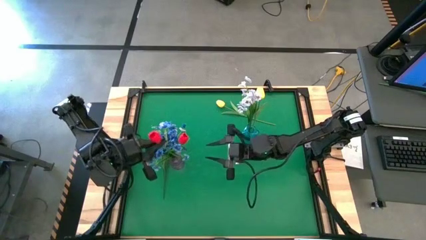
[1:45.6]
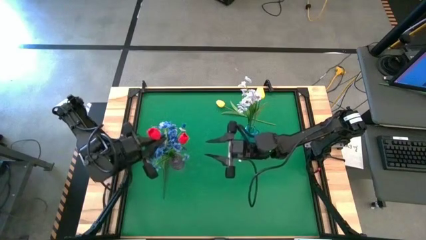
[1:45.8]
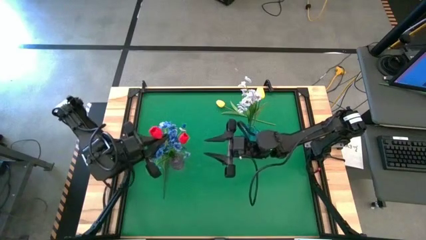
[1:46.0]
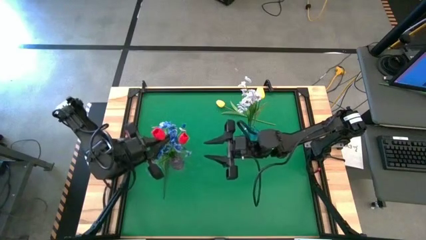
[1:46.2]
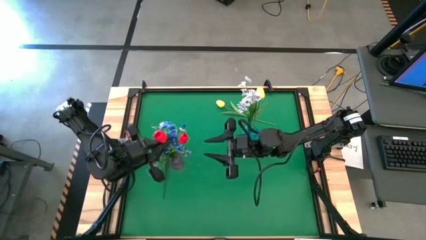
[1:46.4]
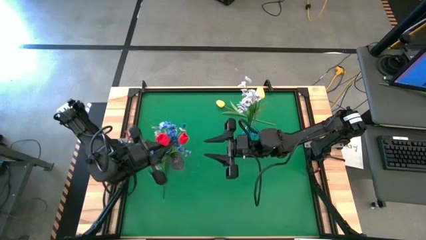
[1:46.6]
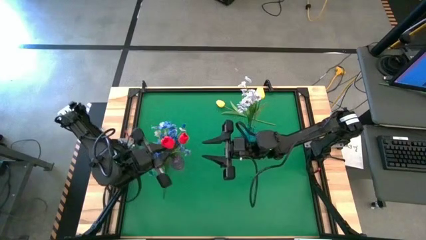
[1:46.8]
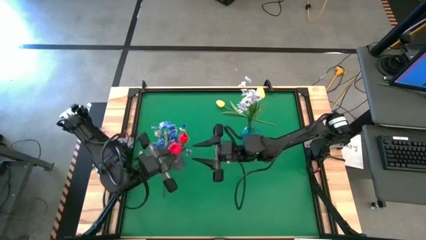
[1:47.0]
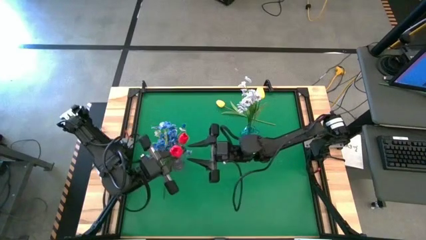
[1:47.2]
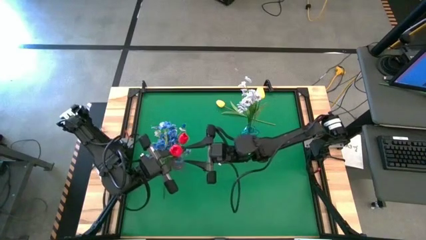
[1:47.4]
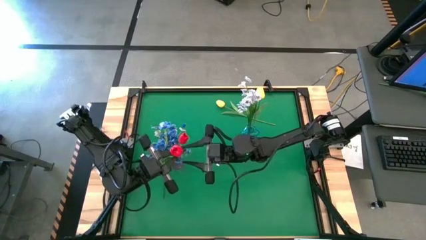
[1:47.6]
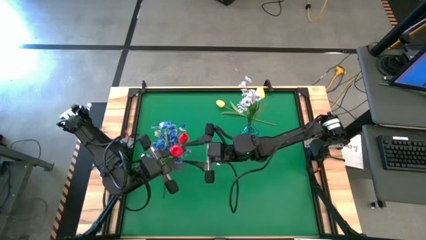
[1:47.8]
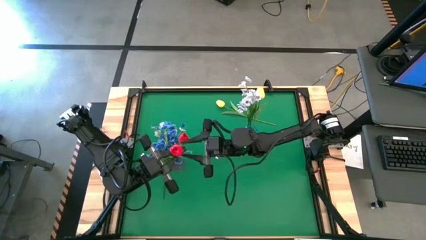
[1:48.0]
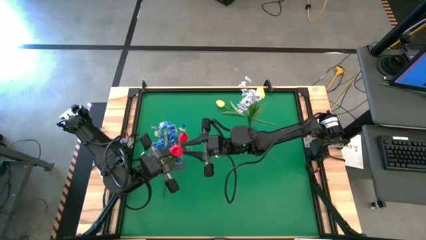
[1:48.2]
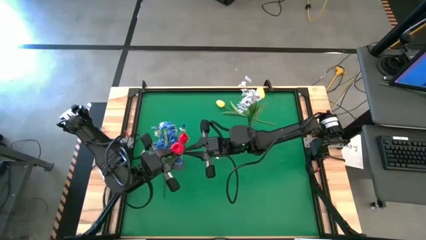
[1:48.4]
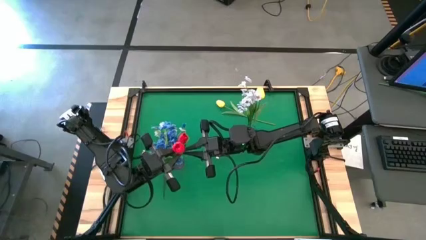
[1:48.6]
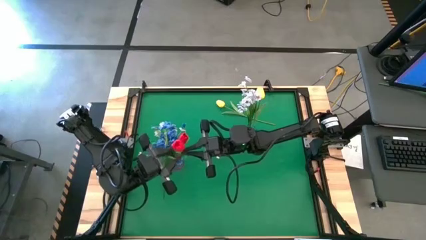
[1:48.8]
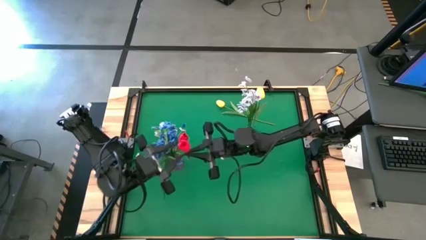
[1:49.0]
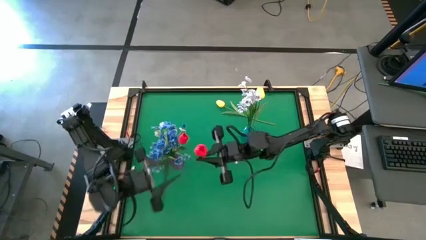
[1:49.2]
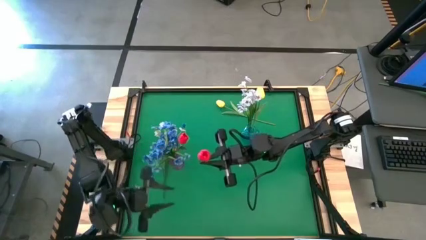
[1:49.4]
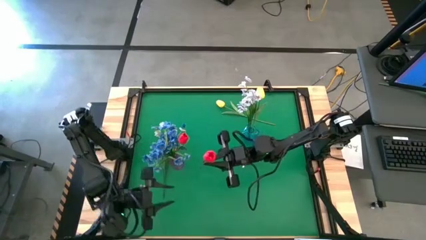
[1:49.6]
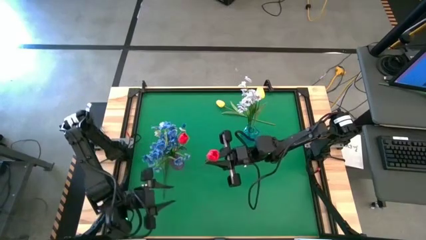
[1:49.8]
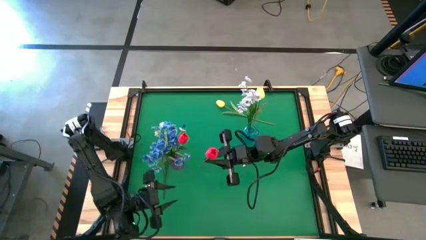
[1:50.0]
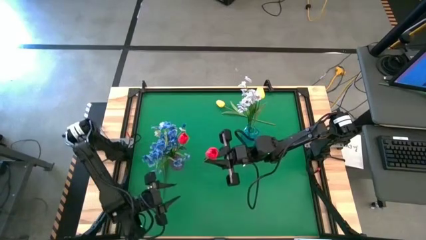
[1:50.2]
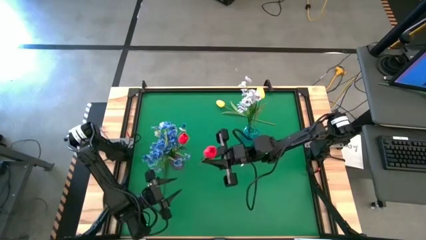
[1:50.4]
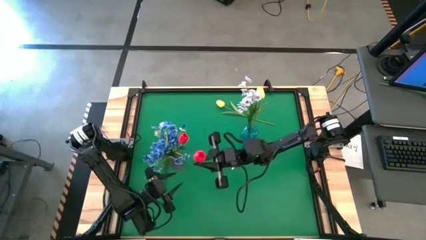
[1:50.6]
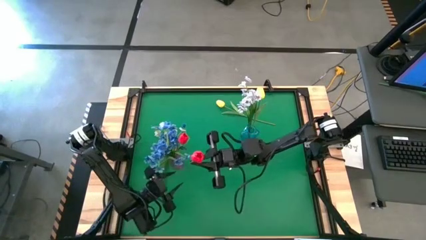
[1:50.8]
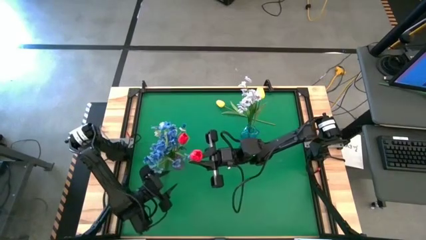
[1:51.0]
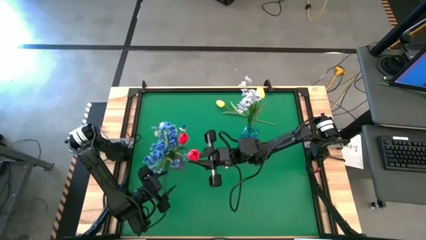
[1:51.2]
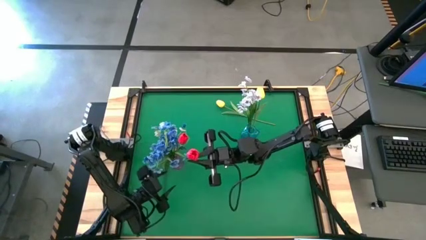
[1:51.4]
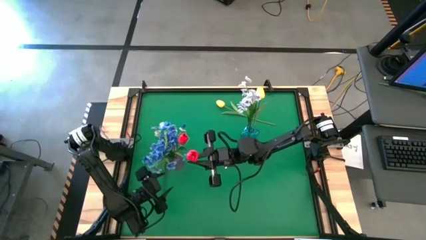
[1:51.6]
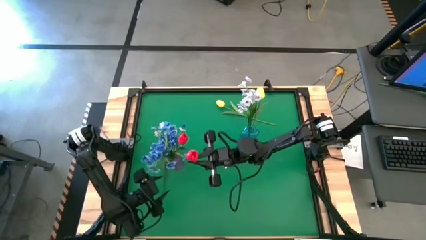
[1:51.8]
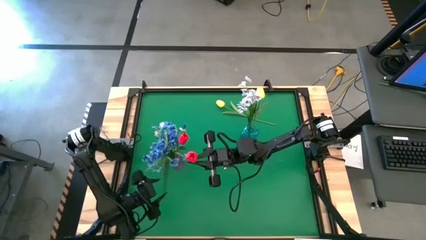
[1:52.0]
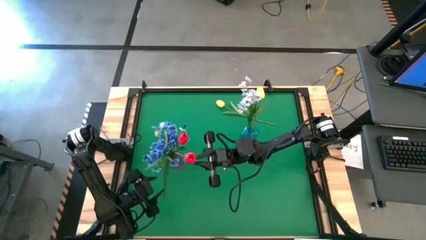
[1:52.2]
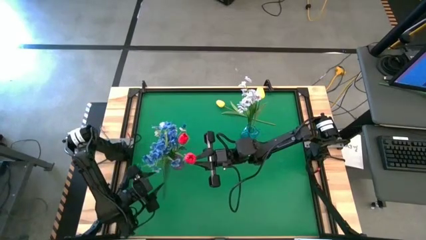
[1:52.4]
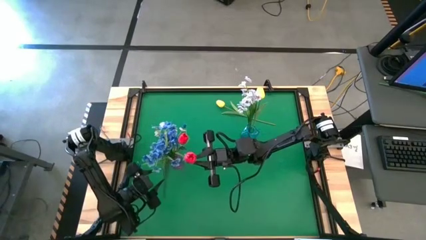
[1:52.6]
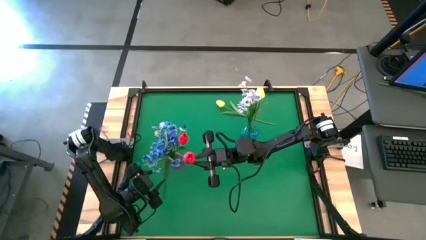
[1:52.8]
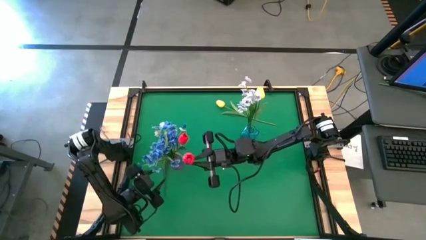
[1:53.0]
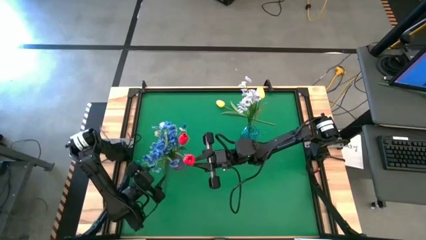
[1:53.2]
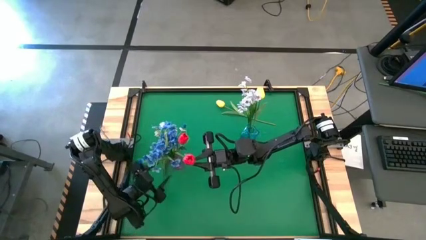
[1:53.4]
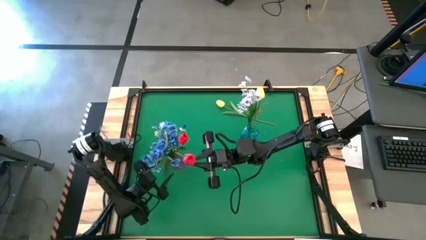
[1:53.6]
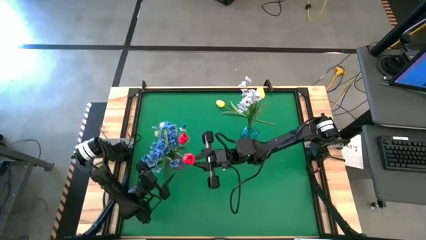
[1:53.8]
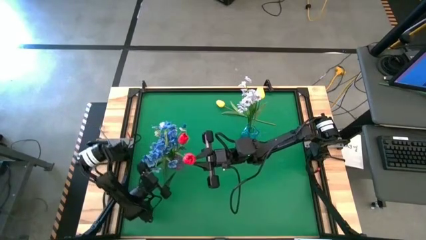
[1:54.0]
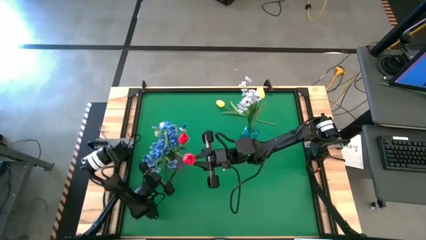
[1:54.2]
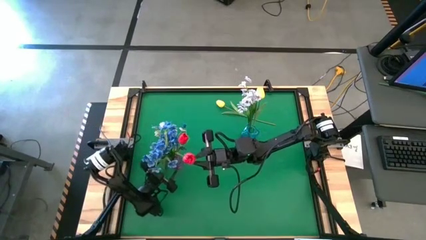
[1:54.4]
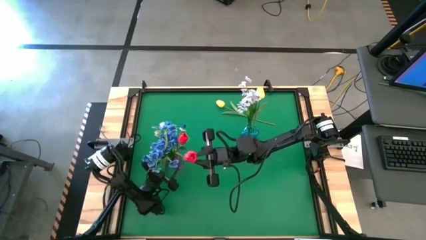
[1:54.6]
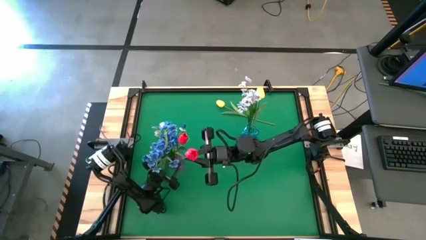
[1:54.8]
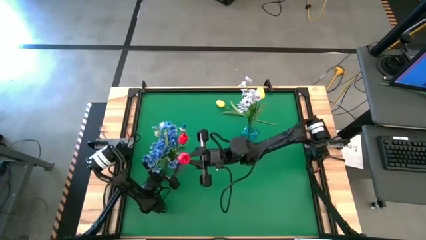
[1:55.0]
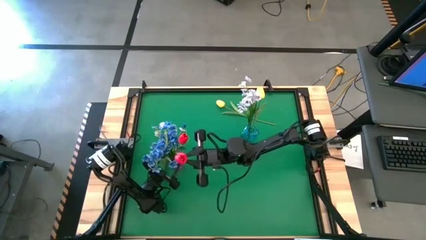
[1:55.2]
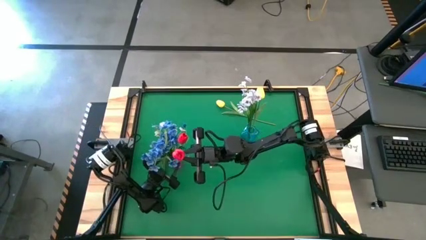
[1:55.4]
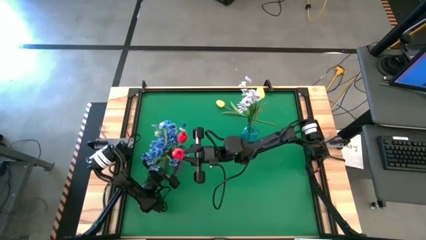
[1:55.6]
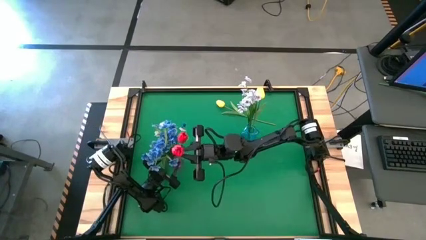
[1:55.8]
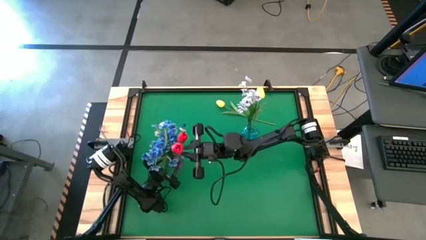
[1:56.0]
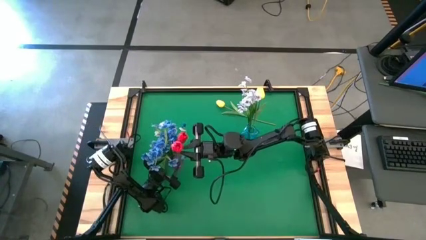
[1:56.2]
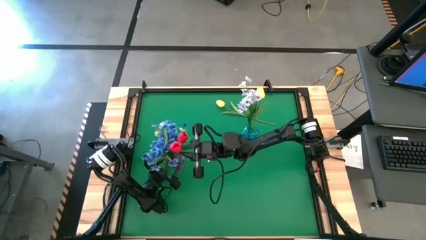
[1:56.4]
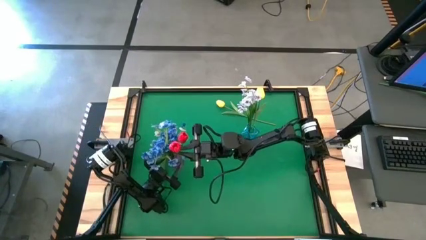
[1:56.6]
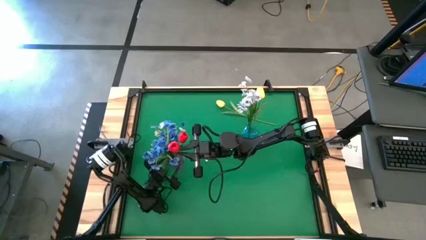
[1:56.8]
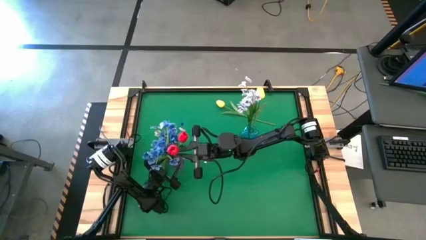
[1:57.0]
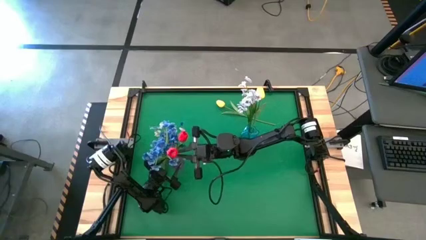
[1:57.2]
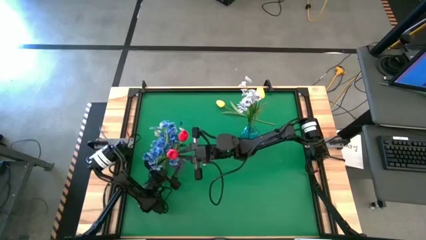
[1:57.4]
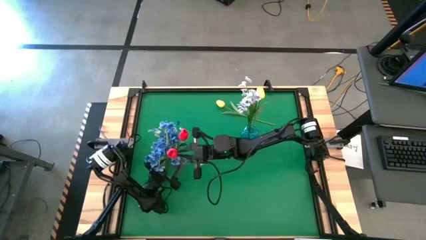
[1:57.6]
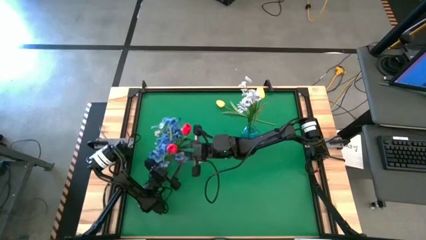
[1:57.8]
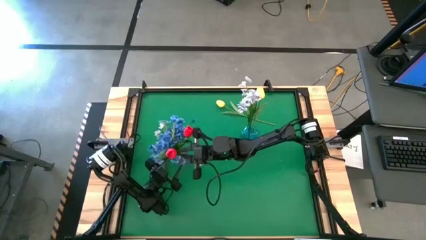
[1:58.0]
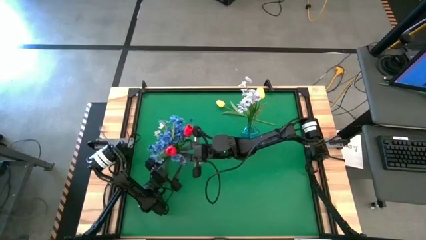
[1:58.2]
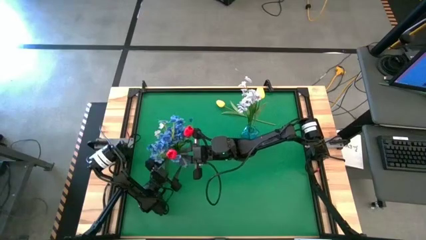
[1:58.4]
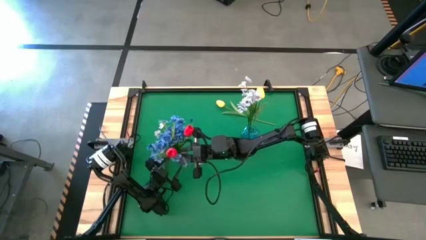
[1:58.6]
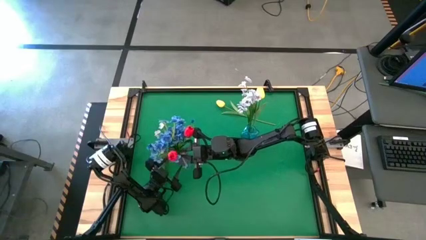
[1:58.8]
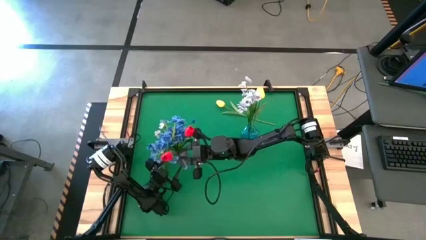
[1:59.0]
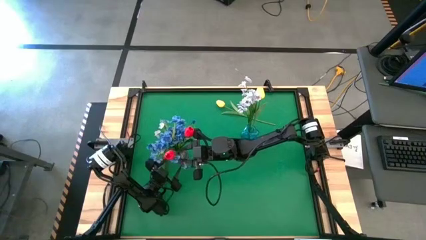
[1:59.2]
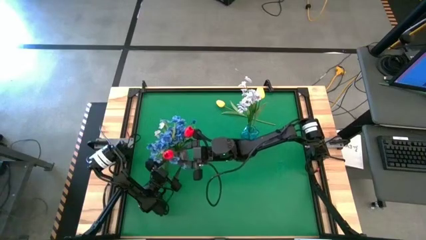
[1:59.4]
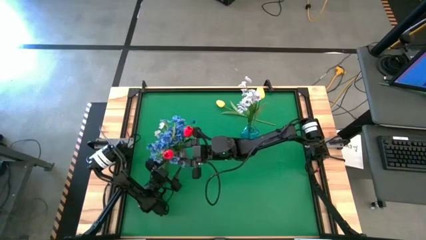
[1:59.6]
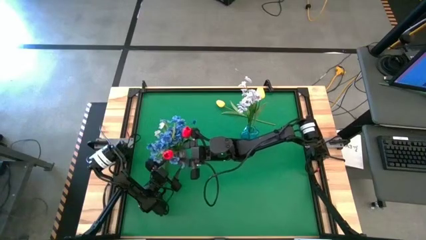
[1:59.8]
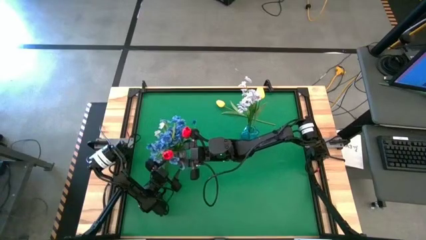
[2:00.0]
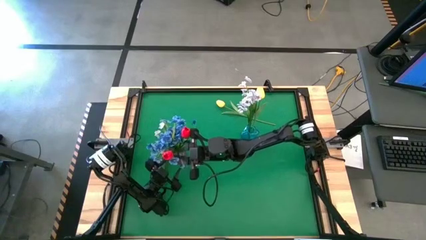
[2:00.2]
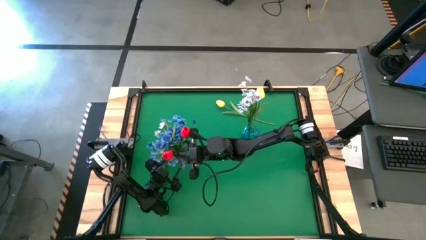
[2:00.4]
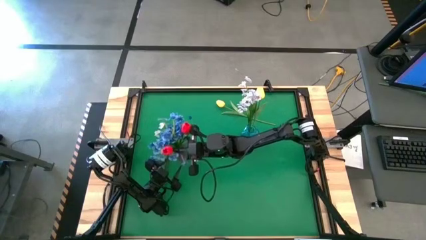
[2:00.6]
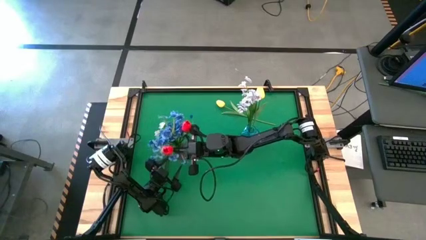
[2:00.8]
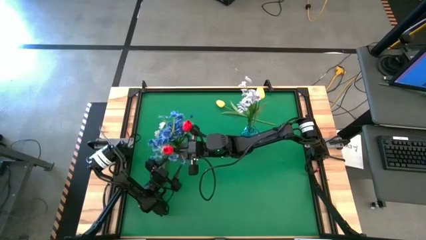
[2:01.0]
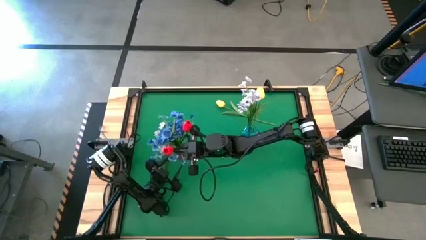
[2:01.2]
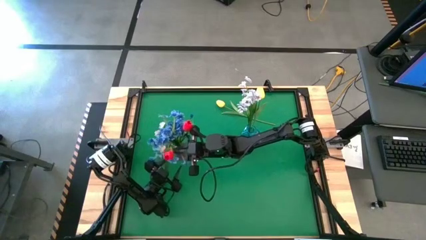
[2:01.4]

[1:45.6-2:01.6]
Task: Sort flowers into vase by color
Put the red tulip into the violet vase
